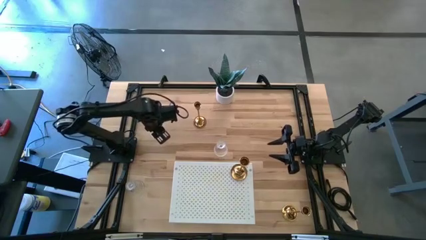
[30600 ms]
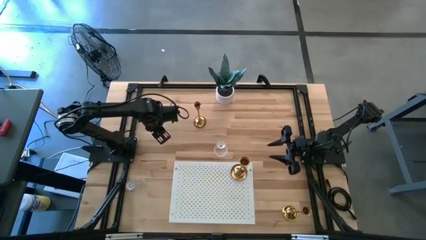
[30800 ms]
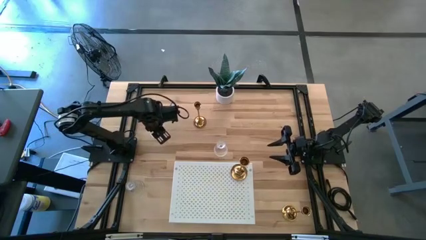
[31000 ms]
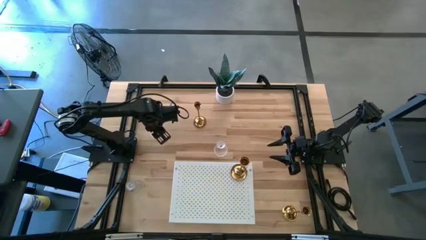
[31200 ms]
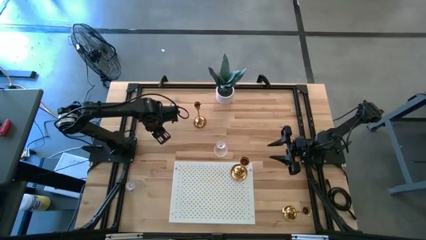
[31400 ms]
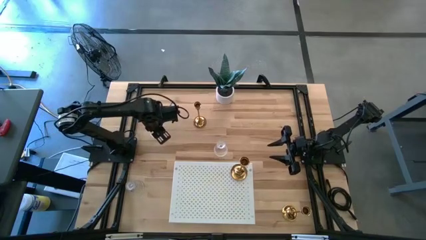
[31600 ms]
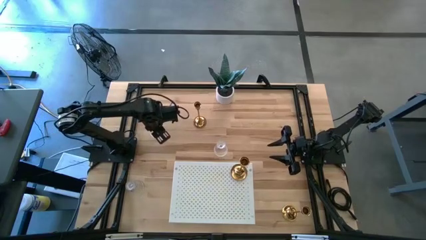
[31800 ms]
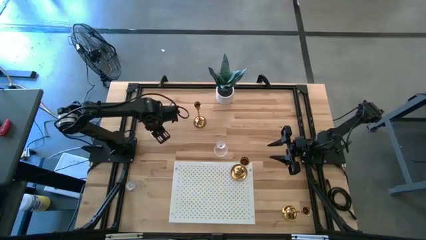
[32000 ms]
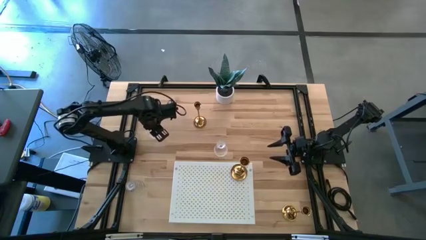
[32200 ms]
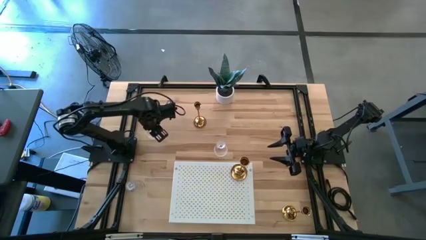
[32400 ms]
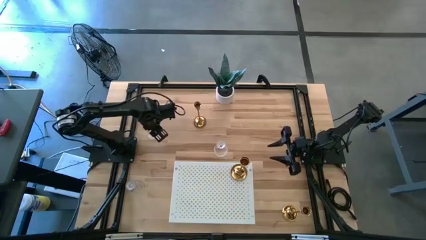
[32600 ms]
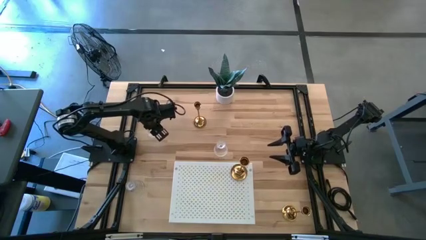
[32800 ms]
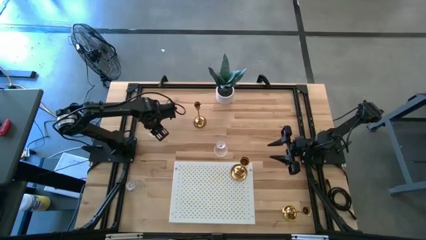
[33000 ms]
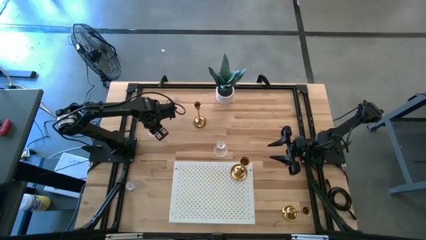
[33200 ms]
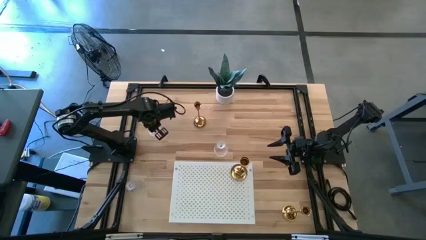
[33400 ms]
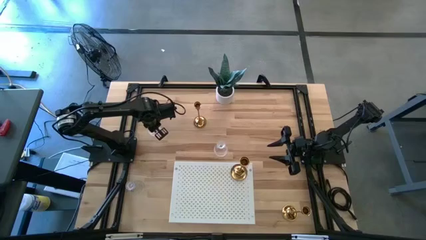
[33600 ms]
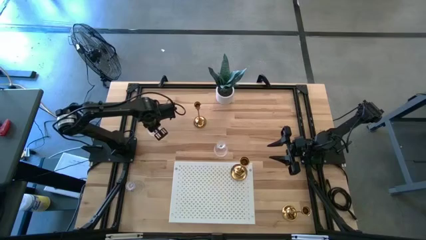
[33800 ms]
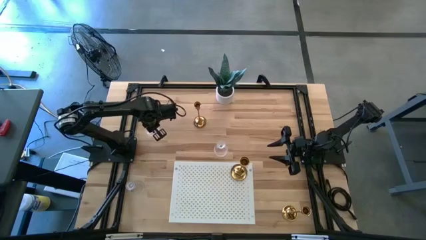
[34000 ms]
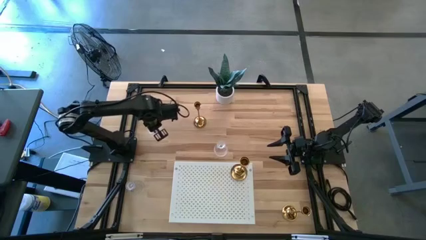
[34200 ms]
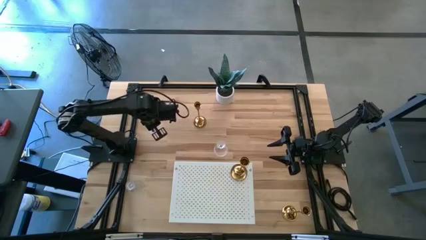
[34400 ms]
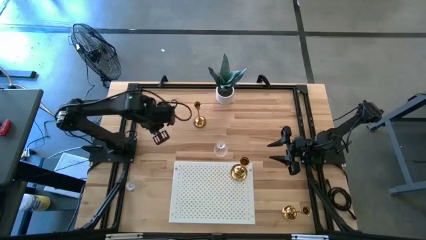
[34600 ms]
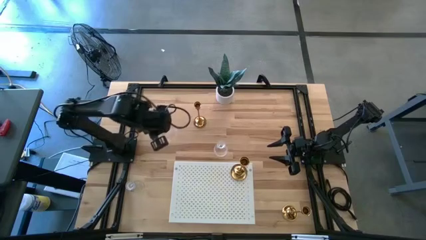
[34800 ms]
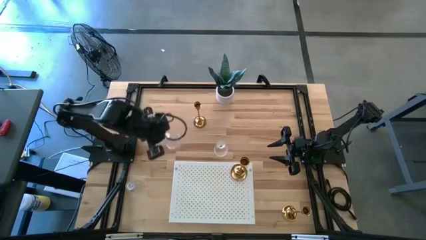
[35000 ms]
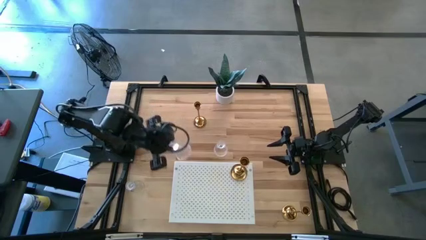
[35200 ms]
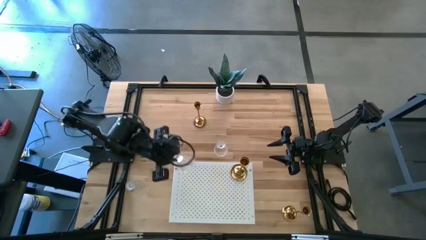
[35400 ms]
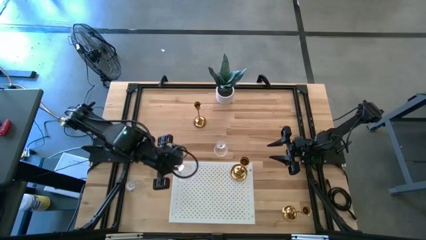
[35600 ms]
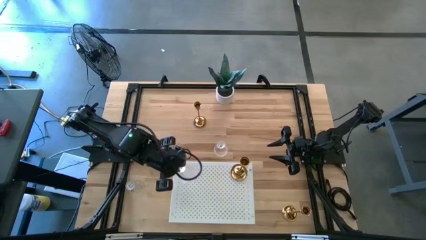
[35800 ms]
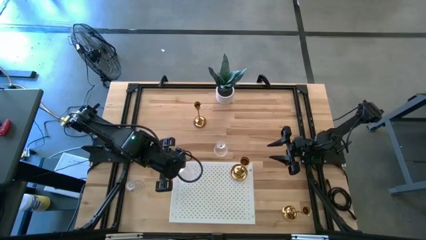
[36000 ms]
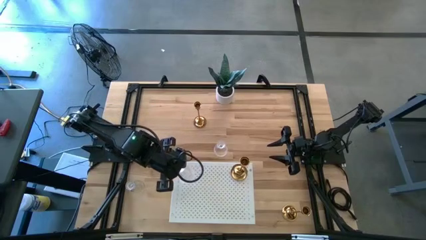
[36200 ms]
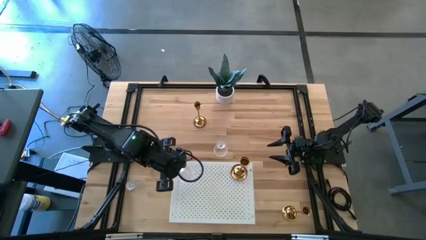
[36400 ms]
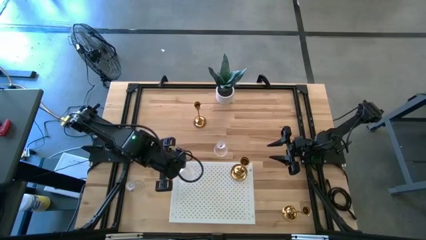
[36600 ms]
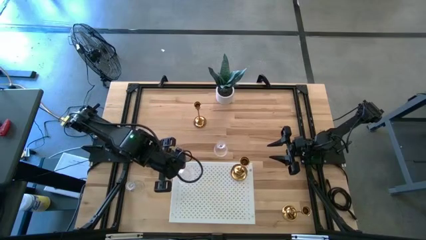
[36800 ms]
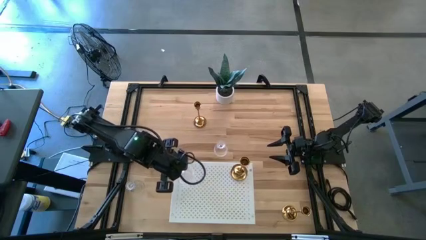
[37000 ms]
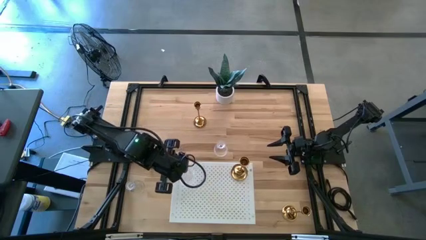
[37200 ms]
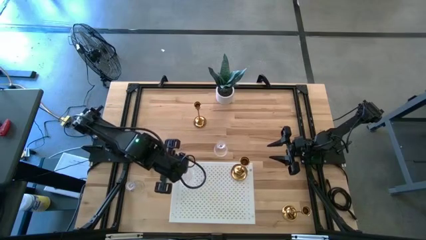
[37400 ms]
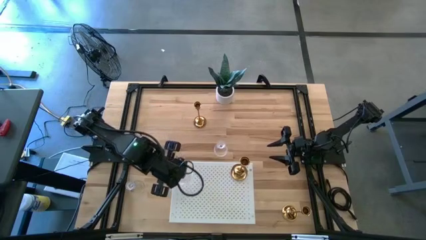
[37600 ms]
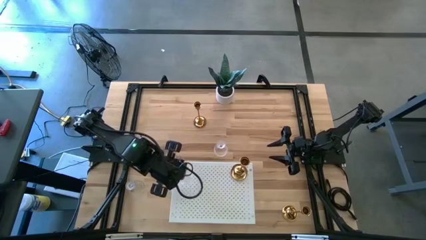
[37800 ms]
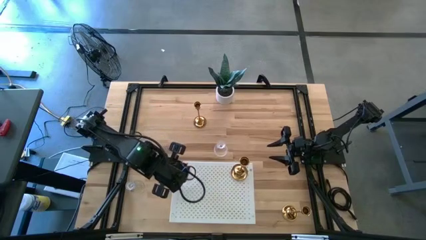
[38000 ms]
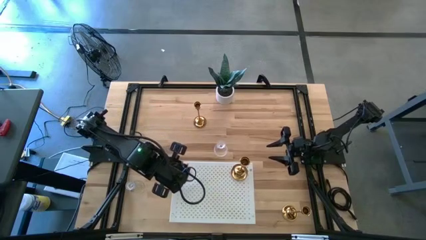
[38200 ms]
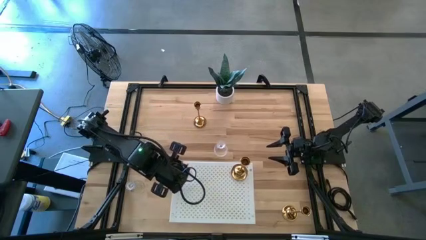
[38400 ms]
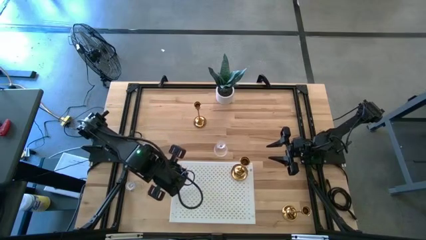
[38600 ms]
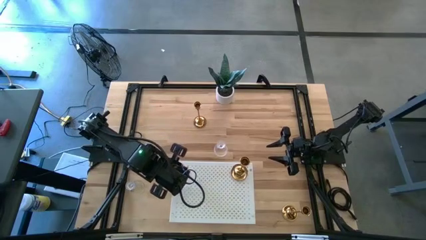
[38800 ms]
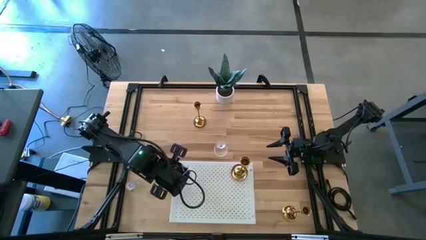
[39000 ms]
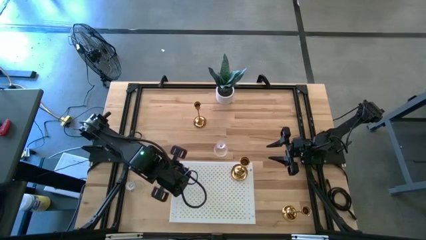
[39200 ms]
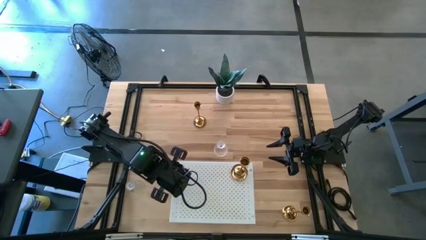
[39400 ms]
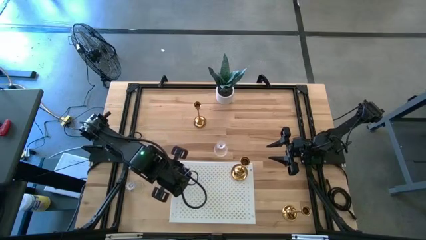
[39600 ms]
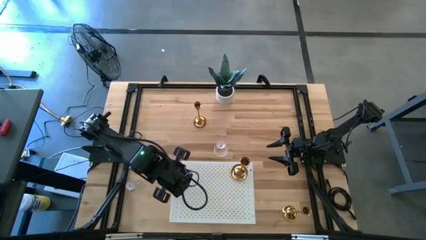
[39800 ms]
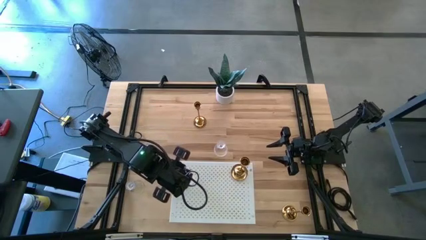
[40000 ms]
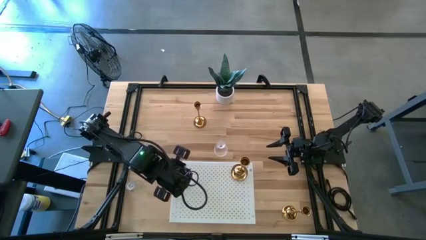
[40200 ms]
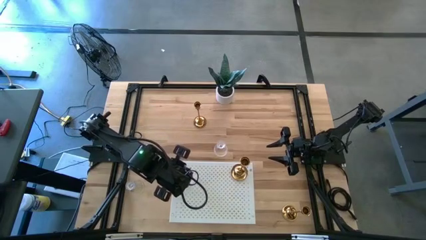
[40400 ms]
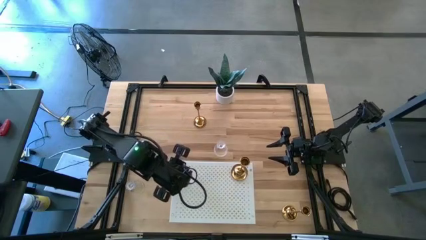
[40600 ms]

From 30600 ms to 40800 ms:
Task: Pick & Place candle stick holders
Put the top left glass candle holder on the shelf

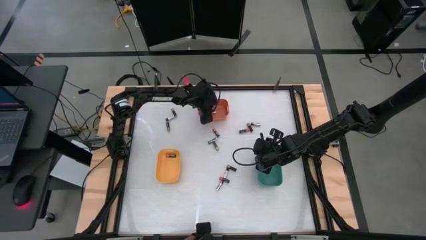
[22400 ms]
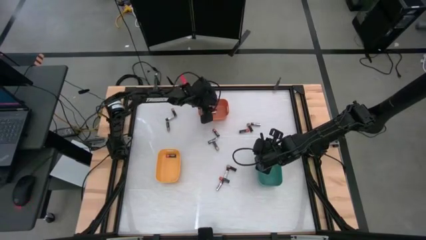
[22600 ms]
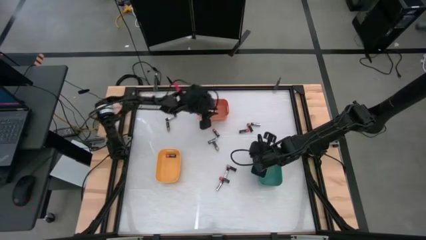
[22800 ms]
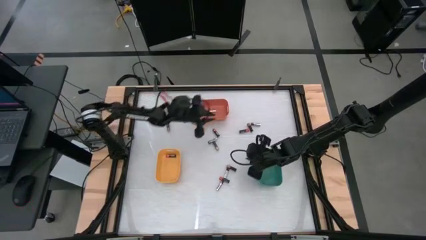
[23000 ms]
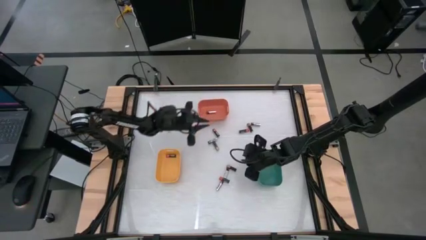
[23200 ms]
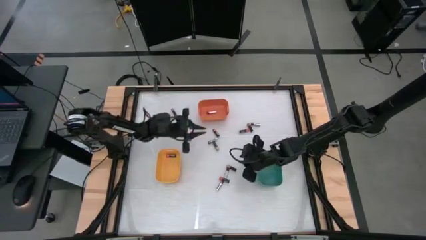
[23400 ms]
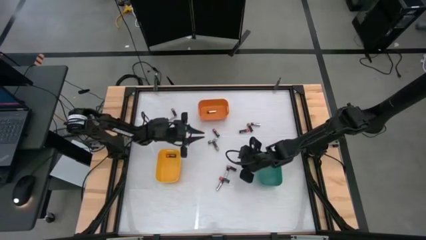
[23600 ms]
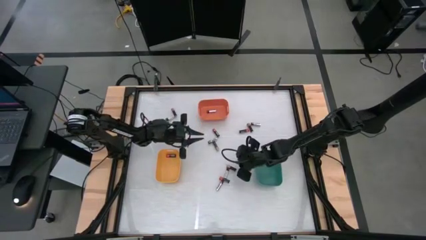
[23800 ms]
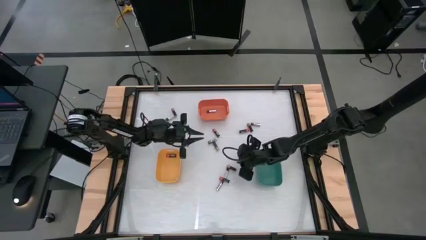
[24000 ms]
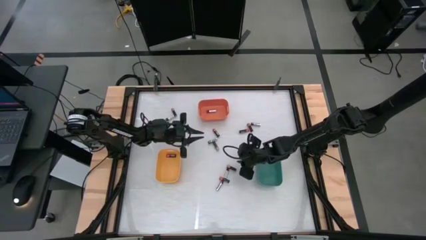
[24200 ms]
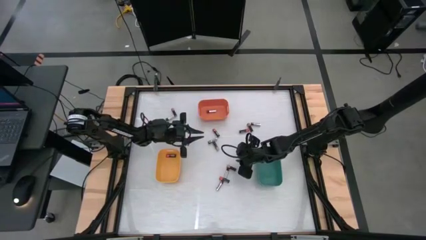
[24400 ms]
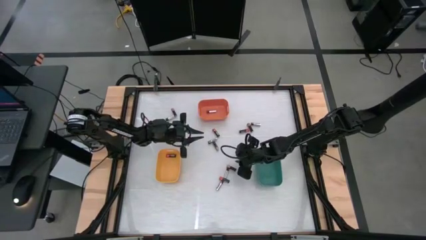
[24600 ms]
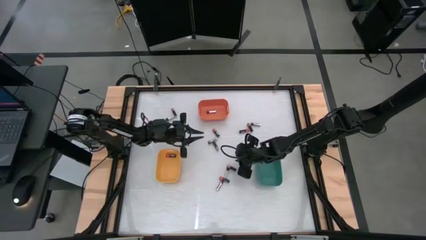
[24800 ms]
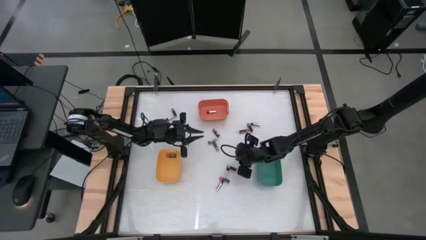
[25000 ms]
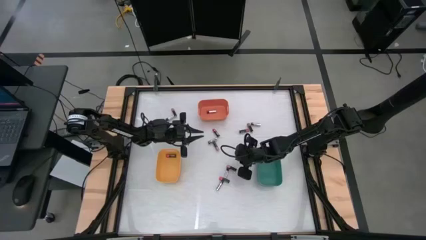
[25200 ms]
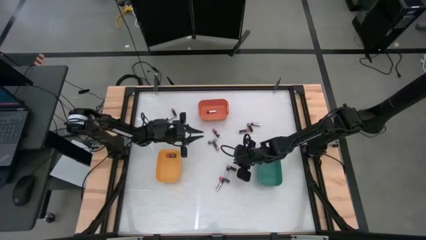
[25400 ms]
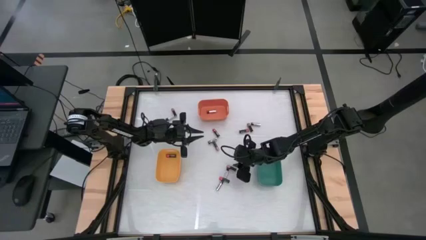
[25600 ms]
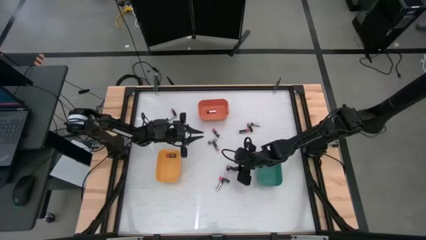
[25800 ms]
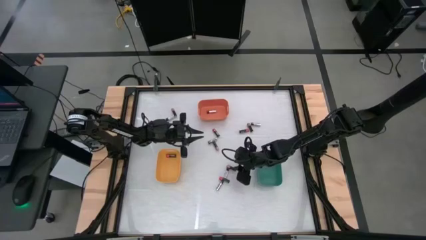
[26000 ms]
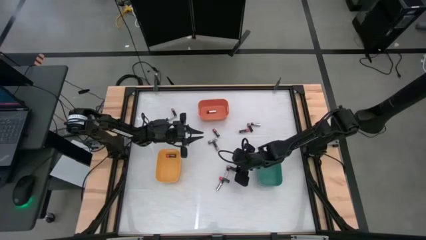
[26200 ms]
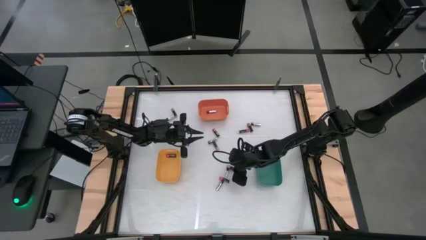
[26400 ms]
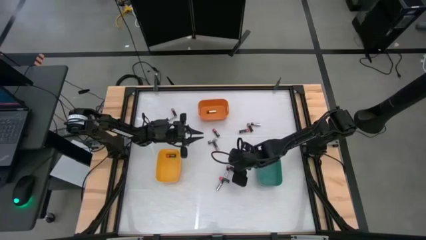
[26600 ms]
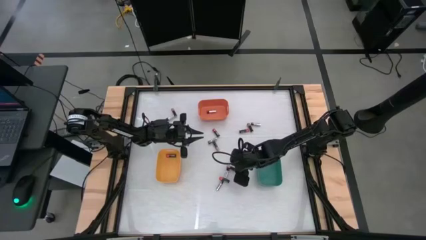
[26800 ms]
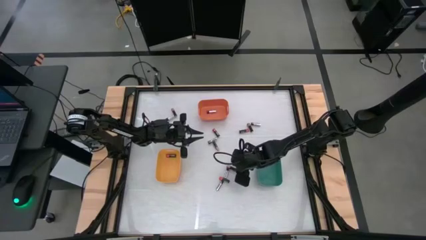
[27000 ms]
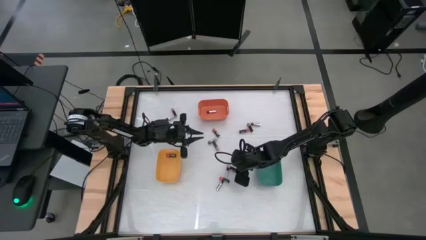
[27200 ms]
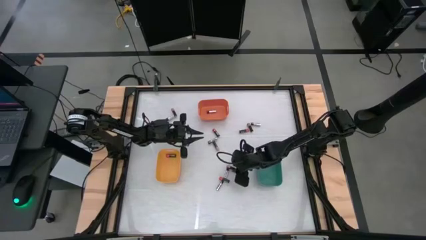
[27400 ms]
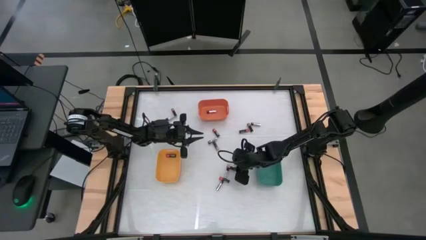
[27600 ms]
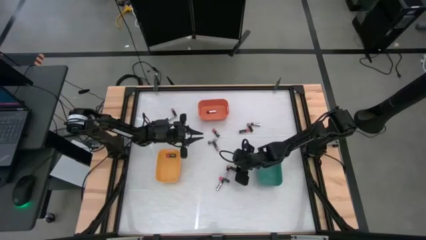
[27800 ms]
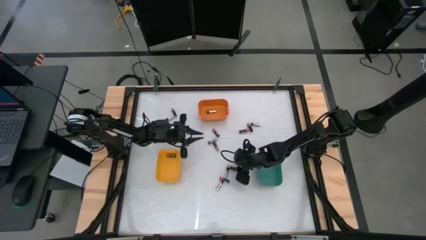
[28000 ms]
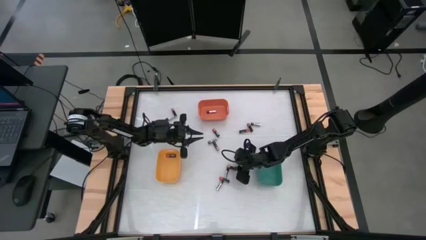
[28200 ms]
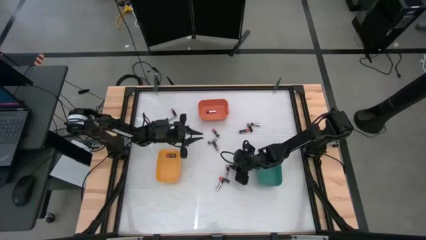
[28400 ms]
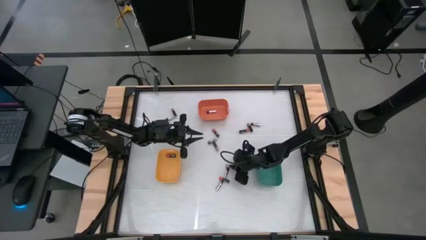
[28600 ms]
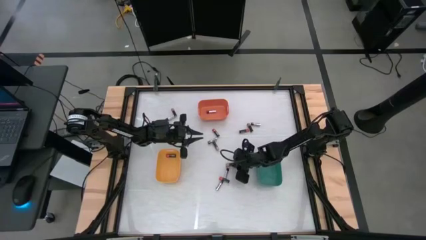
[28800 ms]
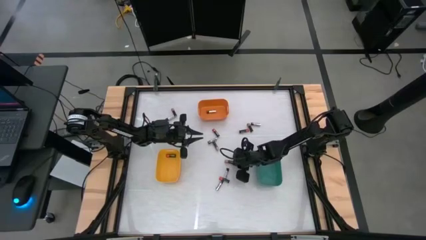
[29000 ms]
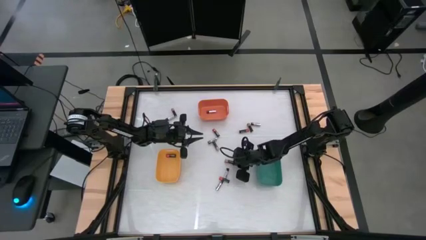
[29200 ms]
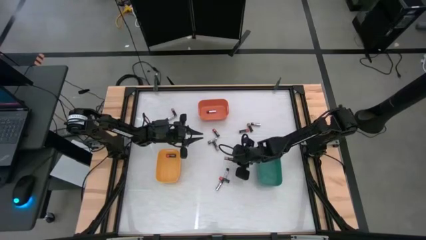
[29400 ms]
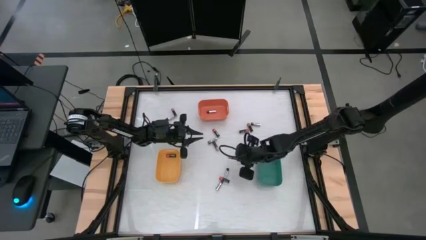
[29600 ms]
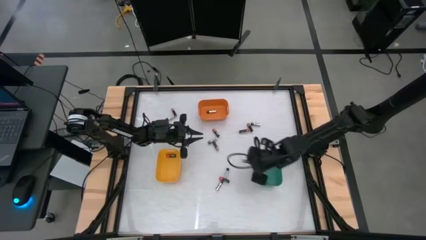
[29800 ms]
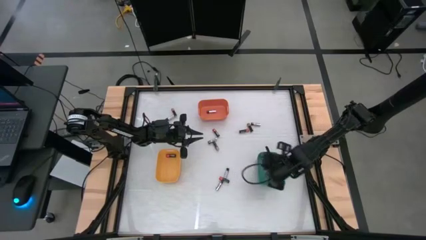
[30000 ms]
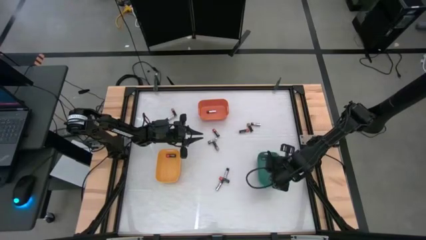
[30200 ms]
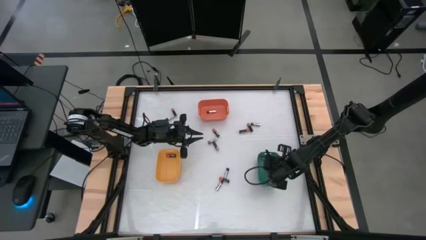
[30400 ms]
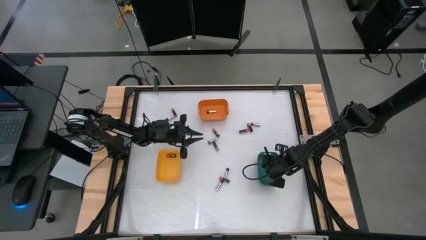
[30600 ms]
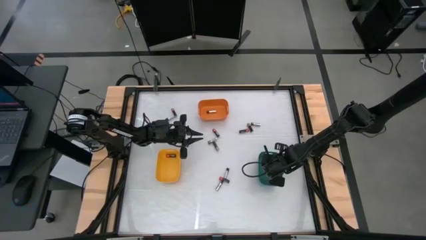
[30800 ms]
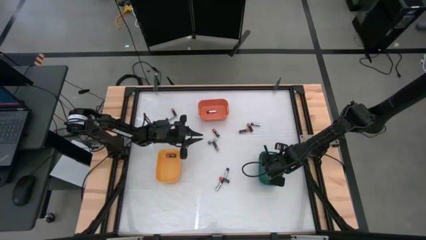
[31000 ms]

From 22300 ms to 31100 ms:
Task: Sort batteries
Put the brown battery into the green bin
